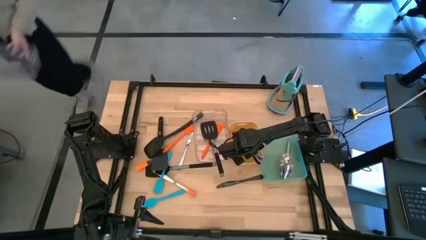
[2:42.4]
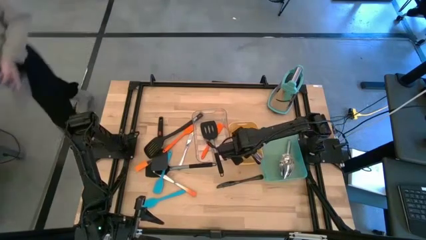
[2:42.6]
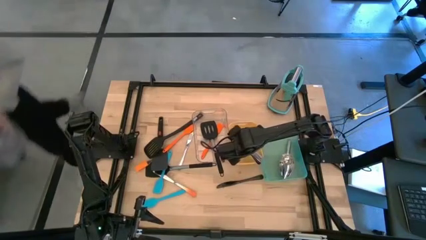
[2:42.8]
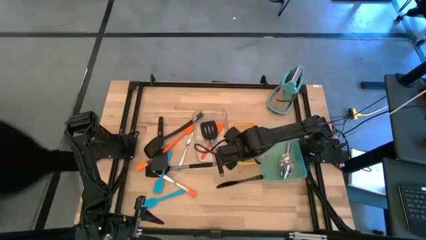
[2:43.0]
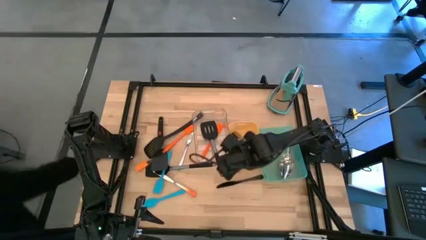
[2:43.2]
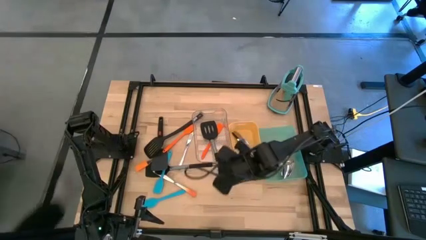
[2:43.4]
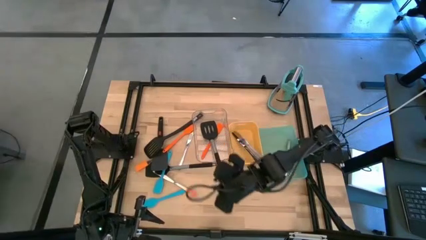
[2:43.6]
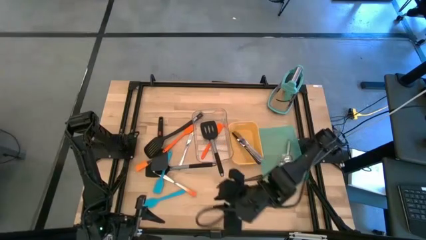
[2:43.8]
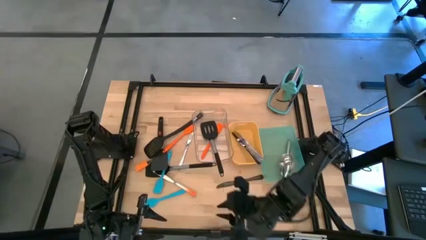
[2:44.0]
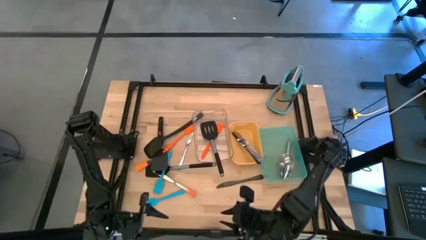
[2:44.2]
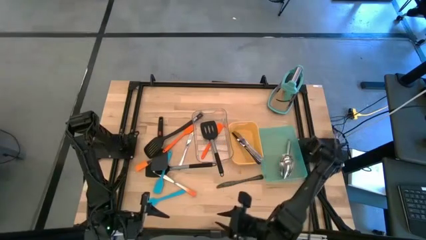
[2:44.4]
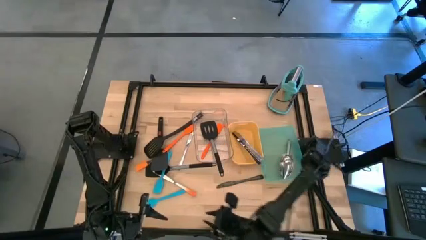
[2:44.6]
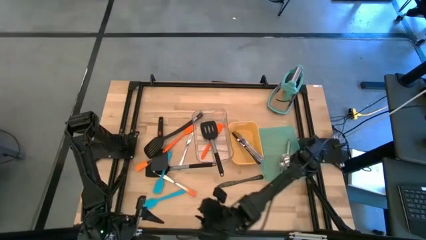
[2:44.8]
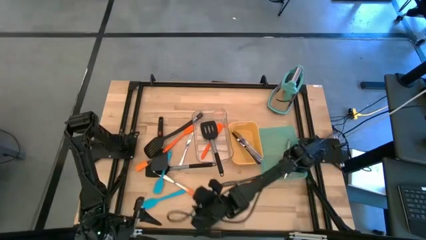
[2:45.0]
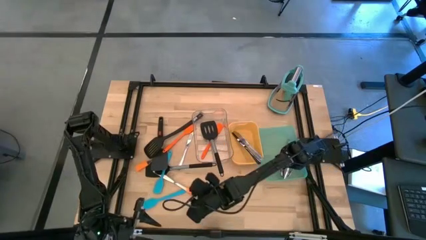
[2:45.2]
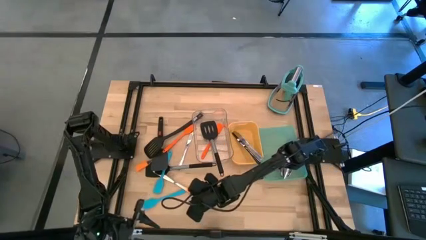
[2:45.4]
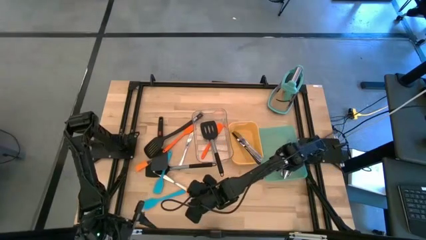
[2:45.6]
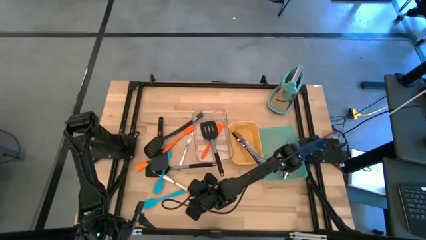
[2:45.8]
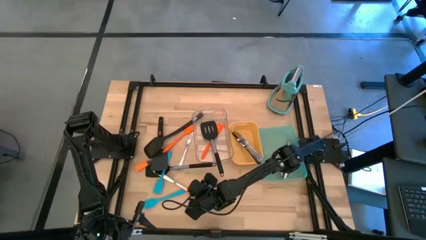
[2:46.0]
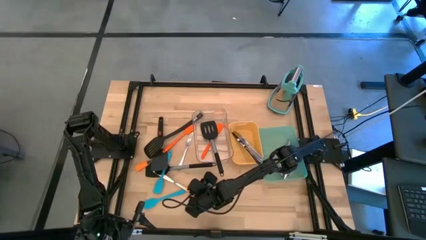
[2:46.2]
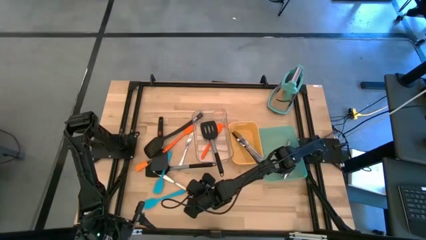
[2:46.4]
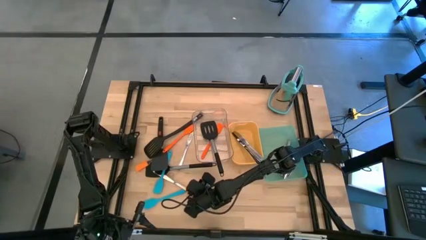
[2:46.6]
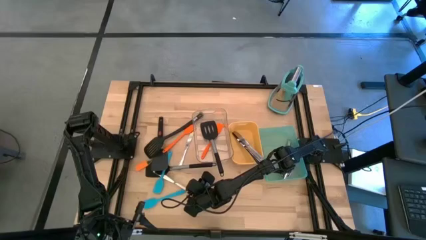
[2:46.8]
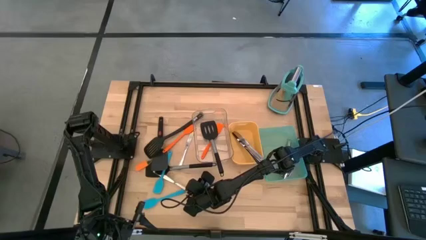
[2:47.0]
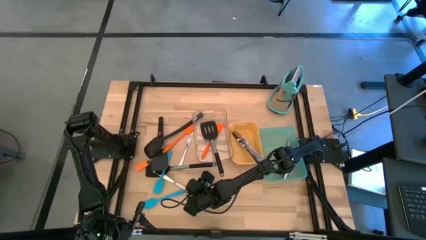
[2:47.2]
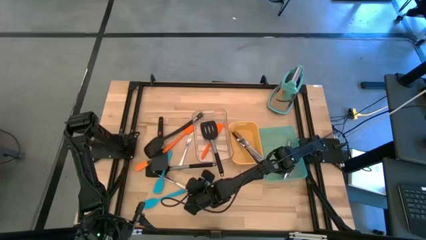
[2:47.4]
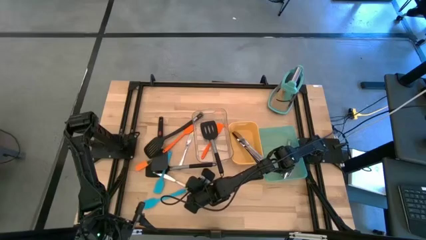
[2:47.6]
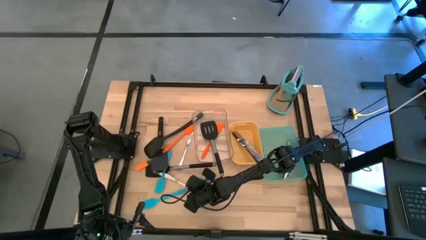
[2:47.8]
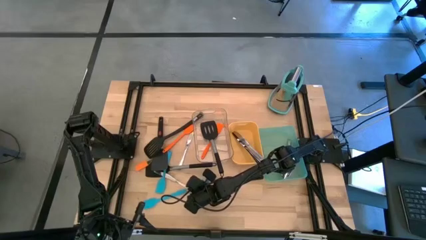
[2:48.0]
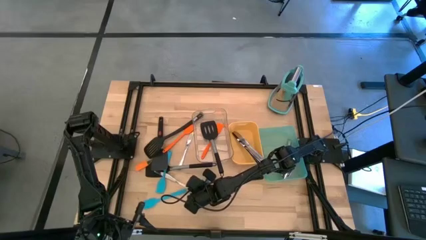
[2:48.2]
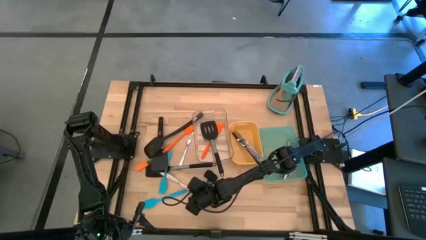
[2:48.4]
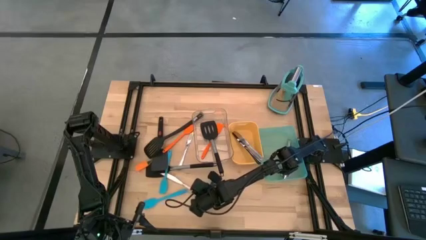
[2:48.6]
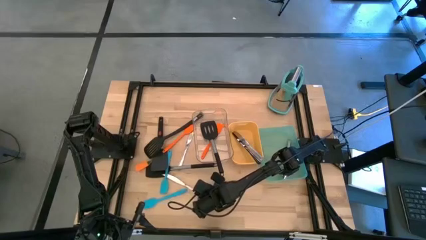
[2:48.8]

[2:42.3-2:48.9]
Task: Pick & Place Kitchen Items
Put the orange table knife into the yellow bin

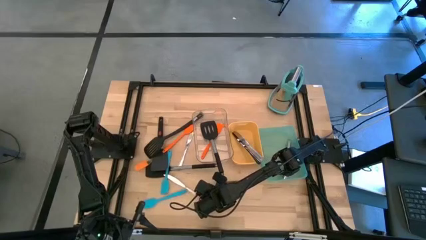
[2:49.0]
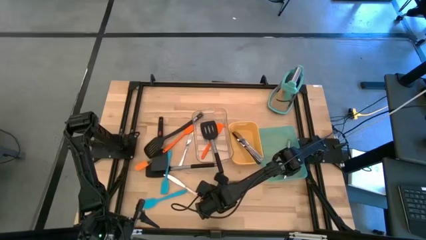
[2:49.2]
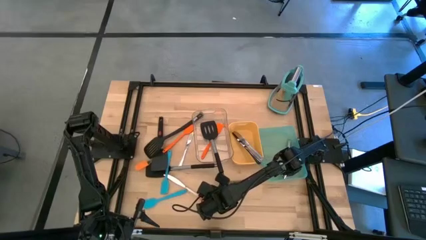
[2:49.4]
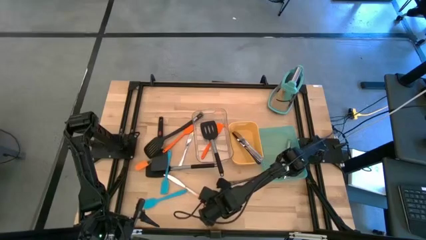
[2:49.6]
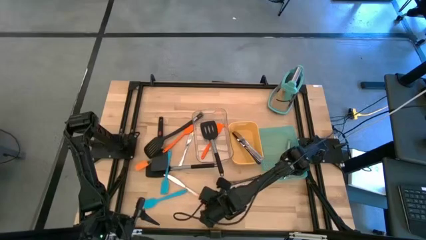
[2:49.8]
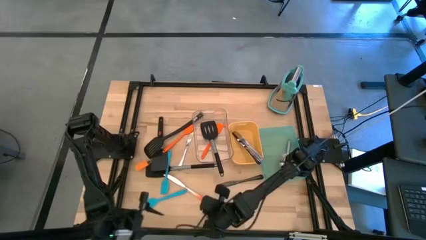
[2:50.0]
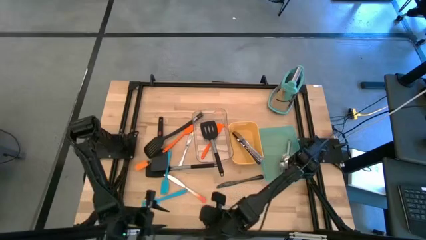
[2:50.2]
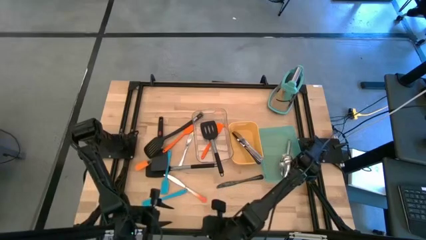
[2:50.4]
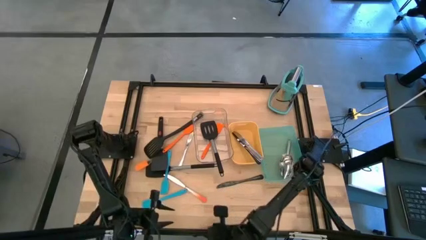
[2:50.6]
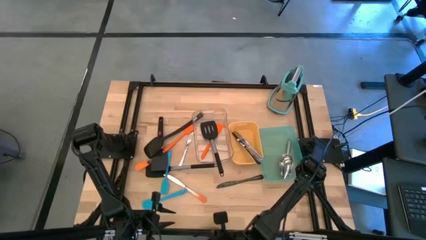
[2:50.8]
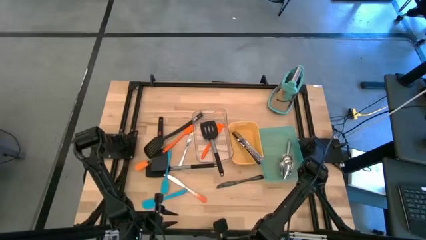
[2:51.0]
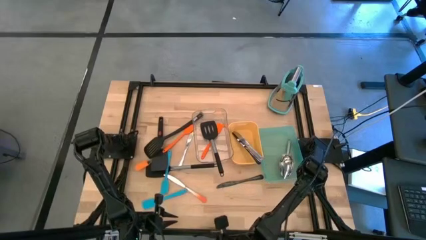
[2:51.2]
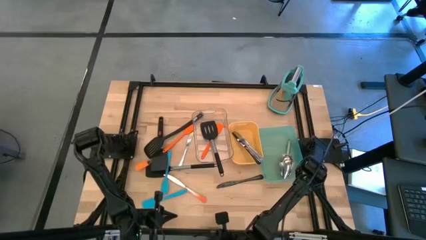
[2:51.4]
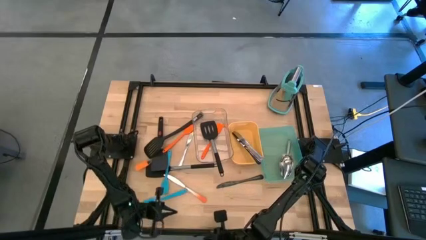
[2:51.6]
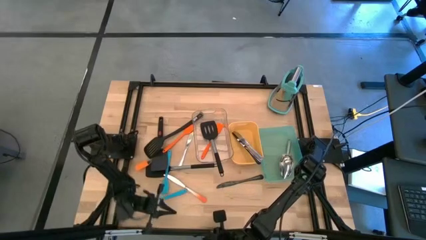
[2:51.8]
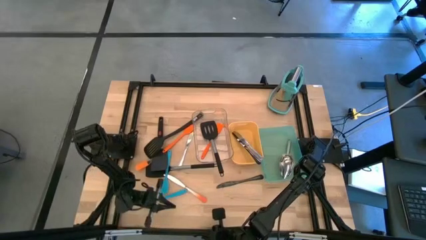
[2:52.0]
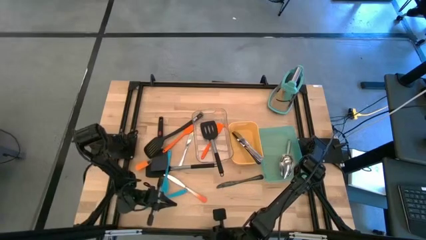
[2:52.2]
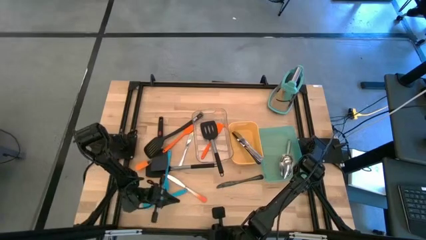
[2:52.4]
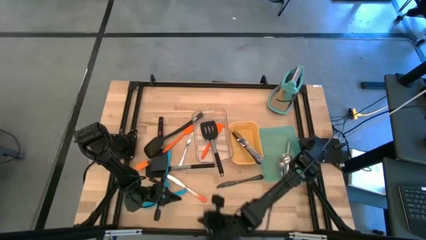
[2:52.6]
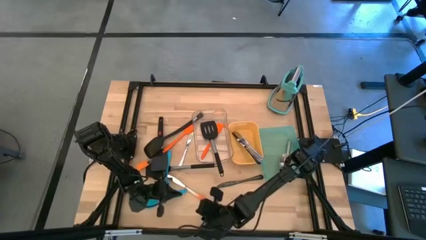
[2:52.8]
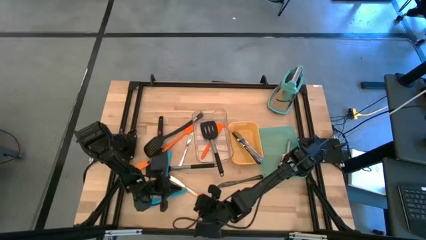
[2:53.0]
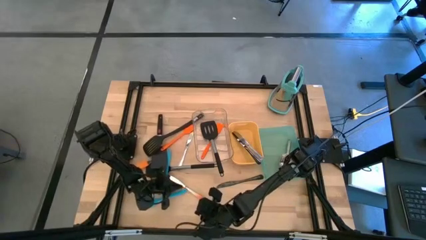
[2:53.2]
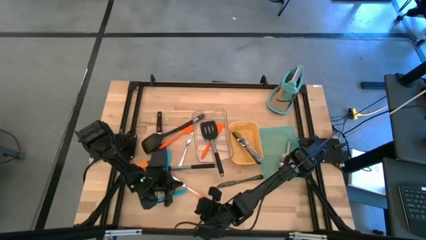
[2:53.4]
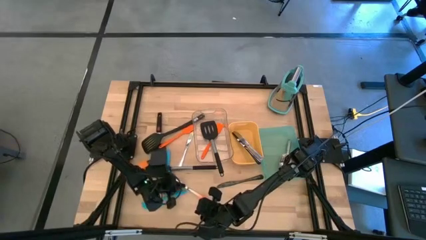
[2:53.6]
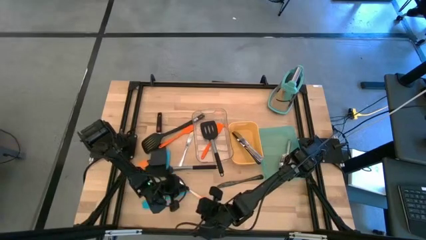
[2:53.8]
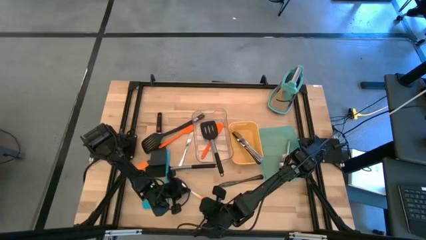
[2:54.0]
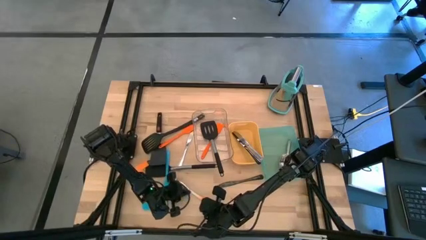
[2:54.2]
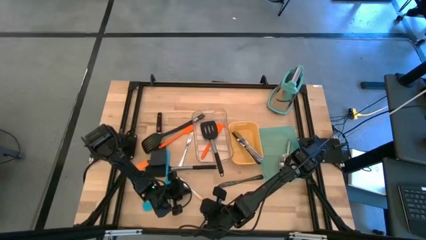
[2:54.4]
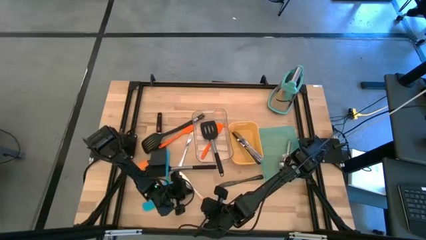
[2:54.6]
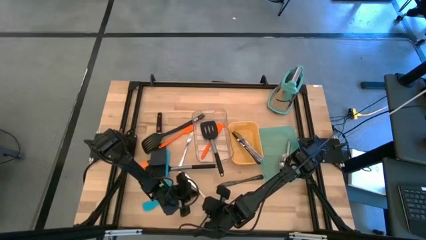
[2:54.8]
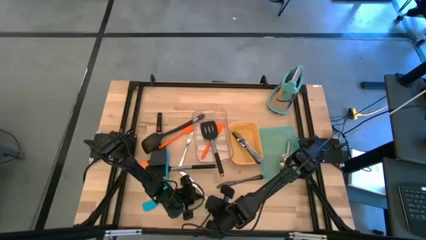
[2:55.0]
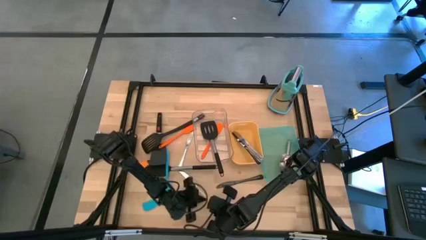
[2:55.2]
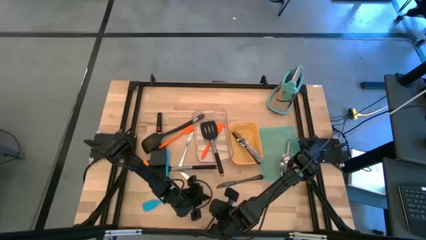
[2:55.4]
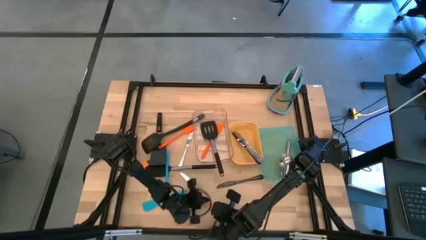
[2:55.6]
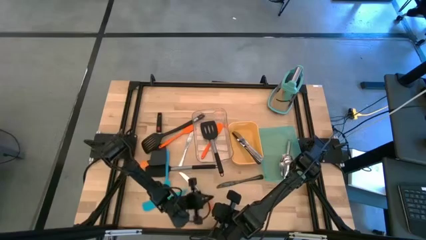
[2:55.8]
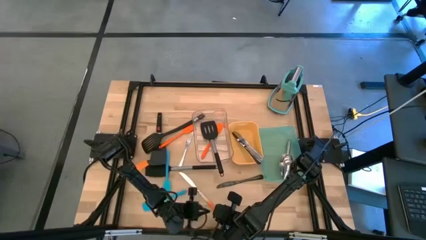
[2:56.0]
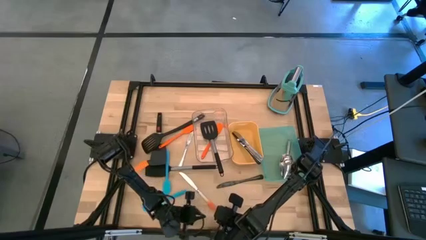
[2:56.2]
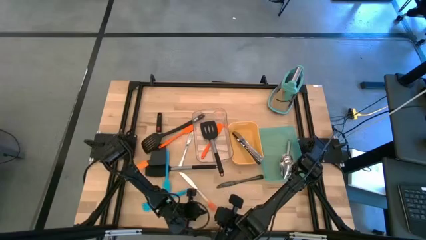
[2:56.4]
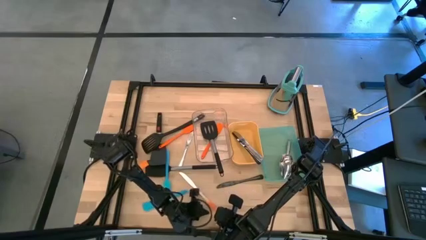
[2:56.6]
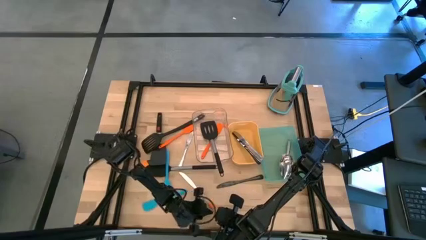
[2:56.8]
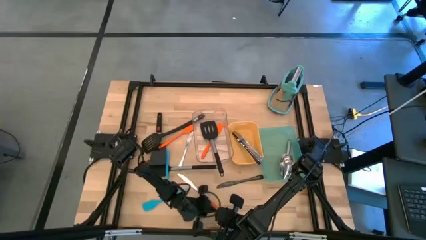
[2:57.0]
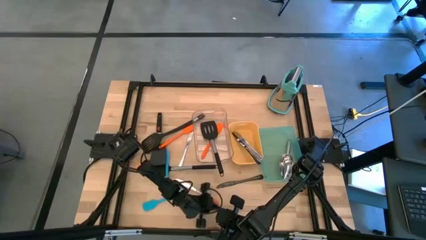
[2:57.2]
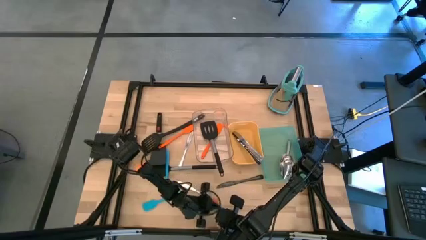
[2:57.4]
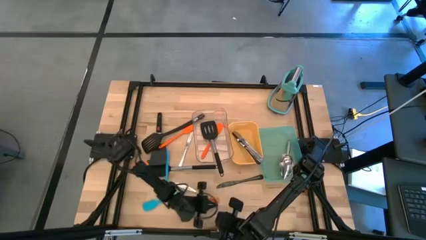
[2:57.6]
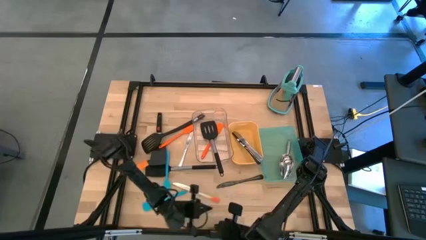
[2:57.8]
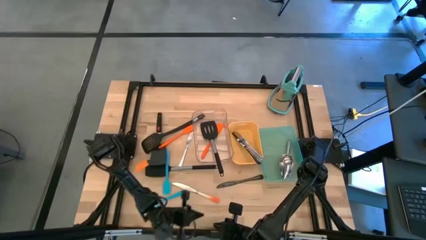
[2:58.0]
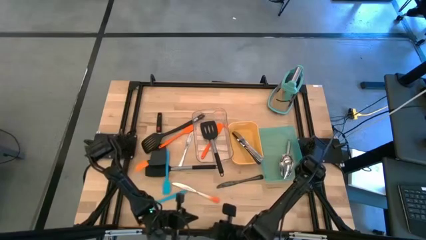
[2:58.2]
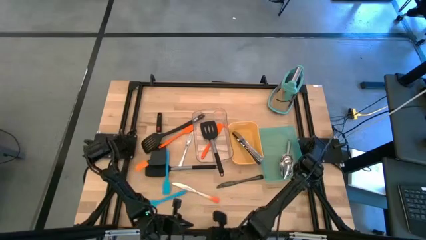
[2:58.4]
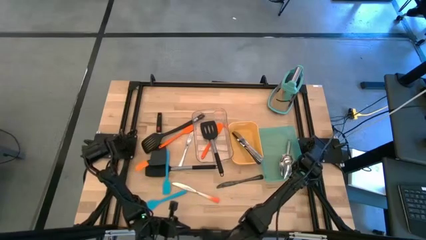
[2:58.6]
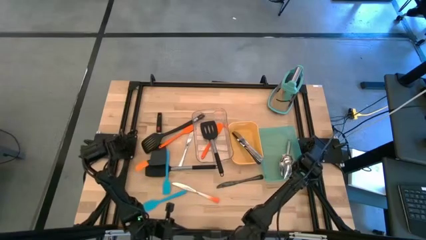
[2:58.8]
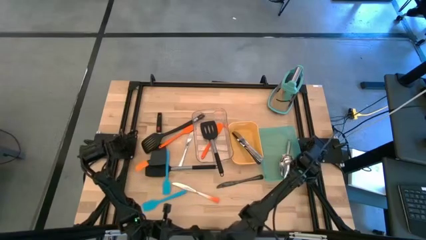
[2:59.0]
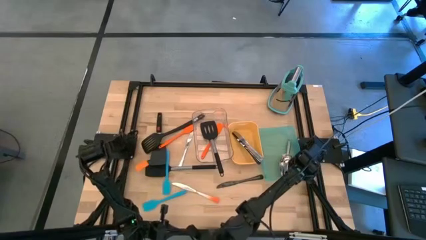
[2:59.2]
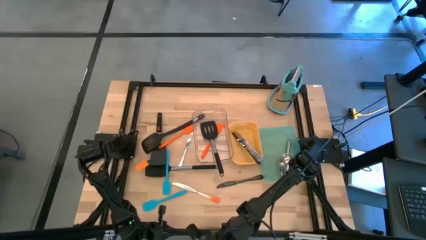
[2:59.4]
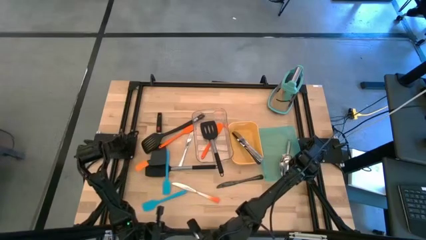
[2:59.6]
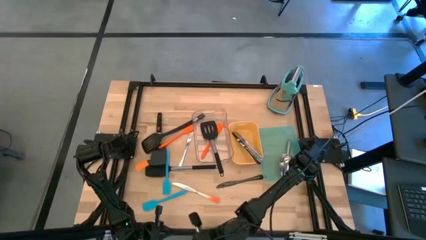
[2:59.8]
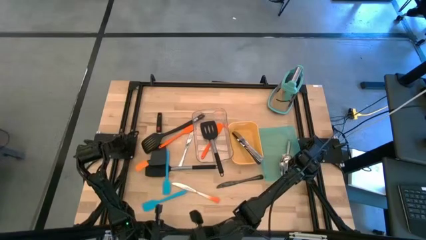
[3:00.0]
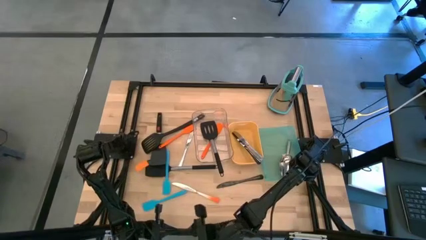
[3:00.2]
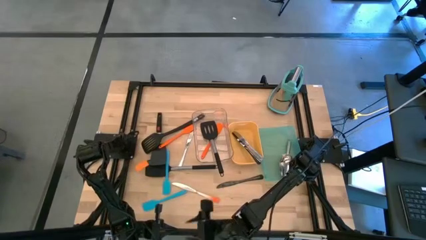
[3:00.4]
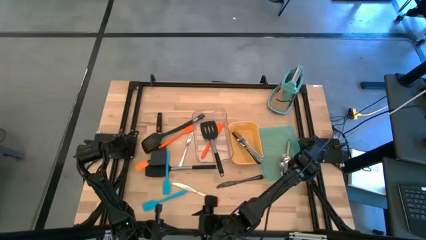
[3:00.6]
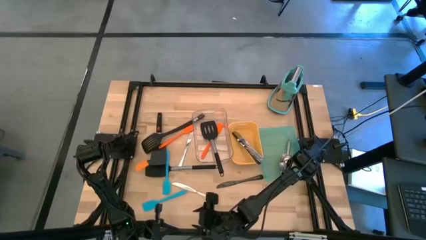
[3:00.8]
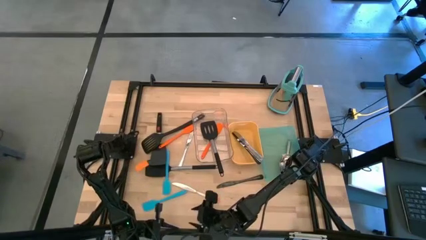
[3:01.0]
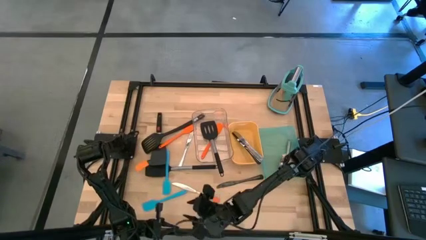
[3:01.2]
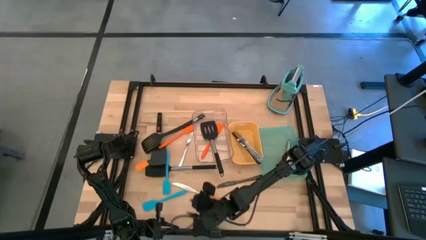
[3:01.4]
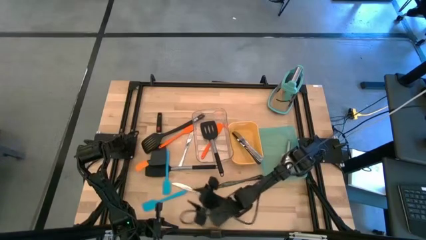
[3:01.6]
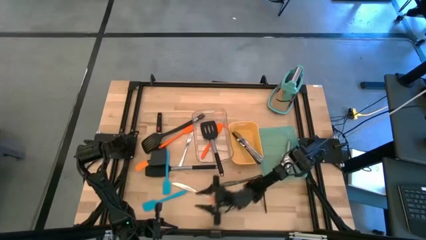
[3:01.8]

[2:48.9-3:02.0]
Put the orange table knife into the yellow bin
